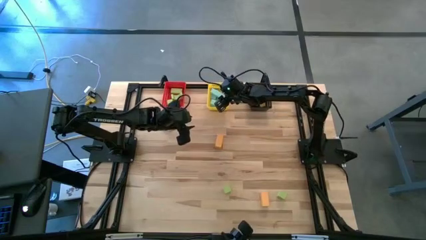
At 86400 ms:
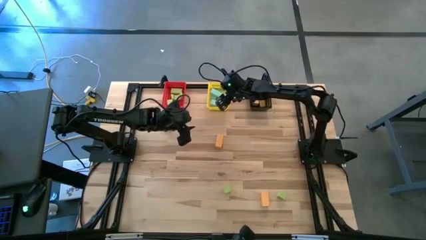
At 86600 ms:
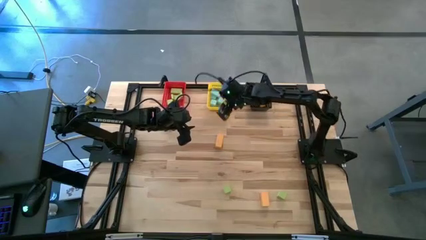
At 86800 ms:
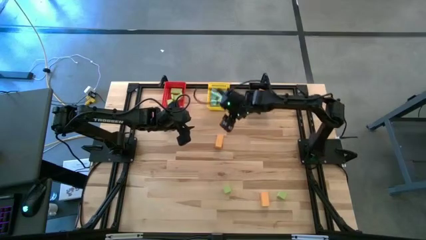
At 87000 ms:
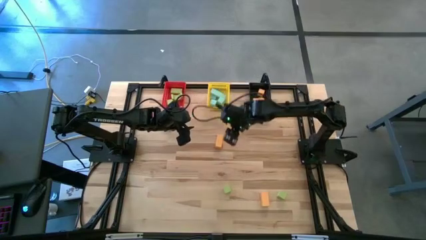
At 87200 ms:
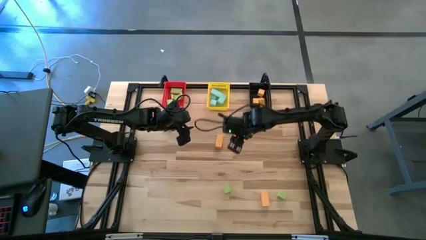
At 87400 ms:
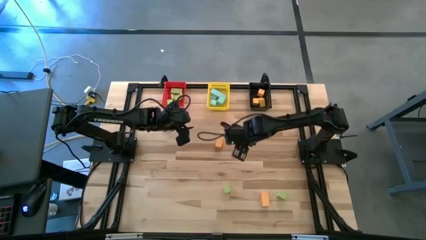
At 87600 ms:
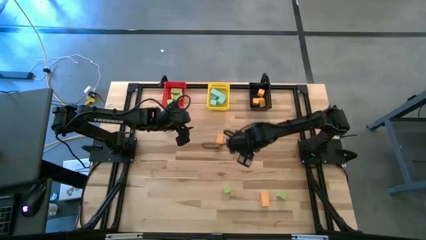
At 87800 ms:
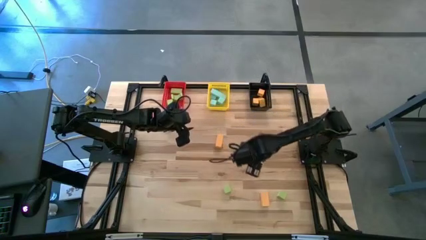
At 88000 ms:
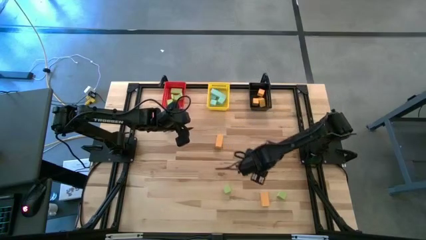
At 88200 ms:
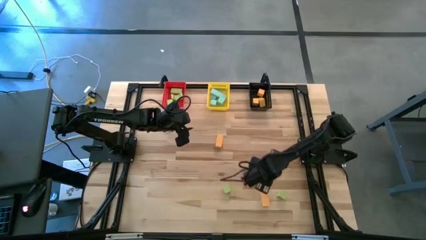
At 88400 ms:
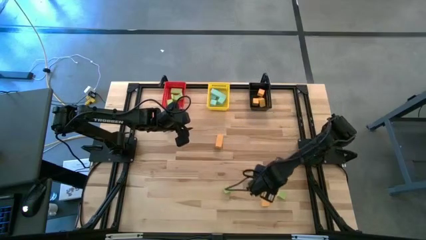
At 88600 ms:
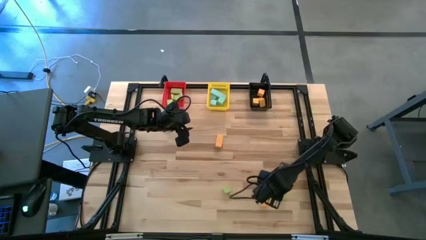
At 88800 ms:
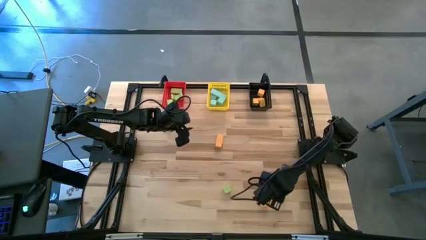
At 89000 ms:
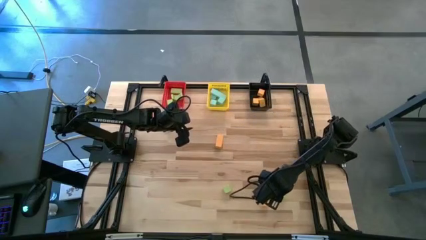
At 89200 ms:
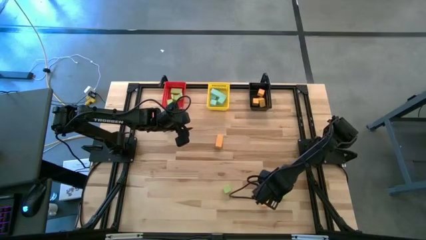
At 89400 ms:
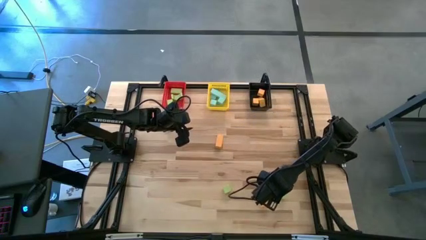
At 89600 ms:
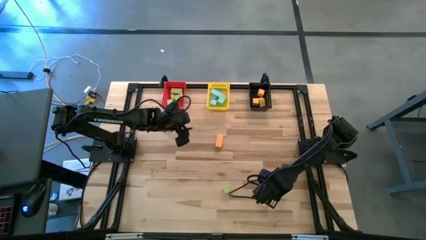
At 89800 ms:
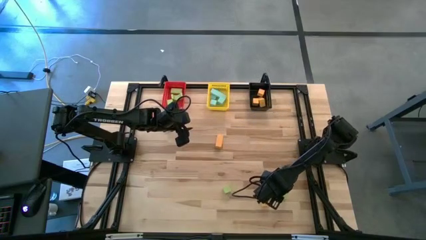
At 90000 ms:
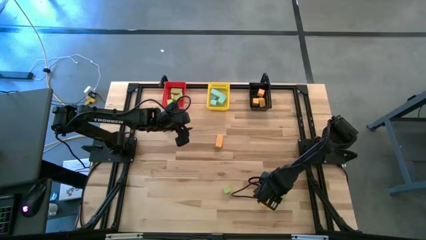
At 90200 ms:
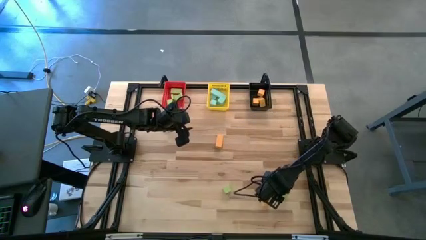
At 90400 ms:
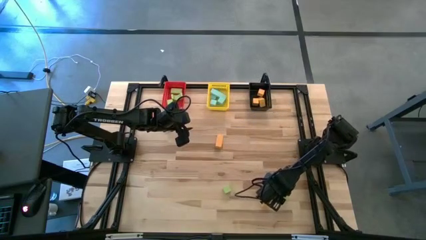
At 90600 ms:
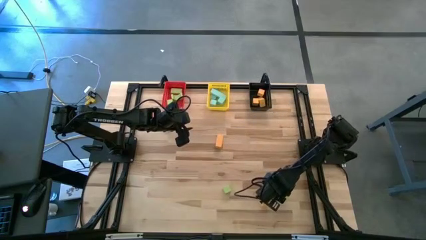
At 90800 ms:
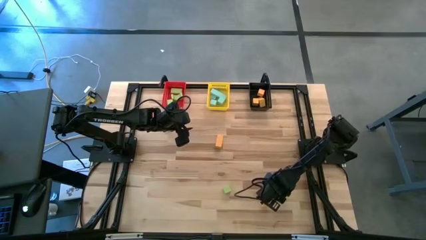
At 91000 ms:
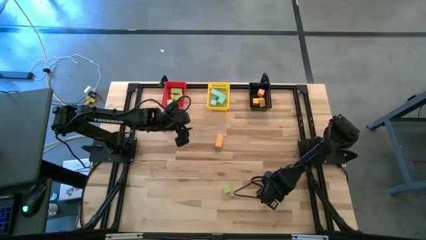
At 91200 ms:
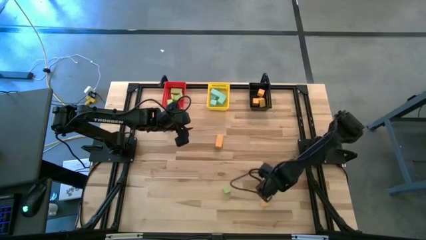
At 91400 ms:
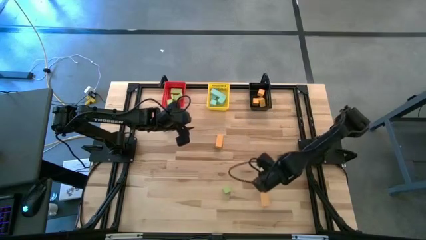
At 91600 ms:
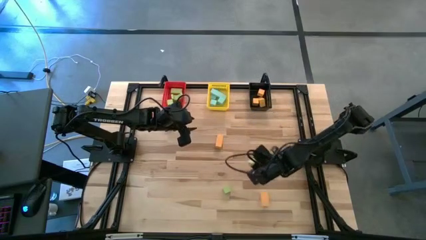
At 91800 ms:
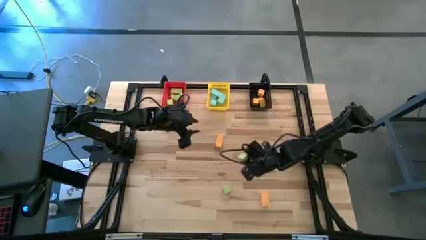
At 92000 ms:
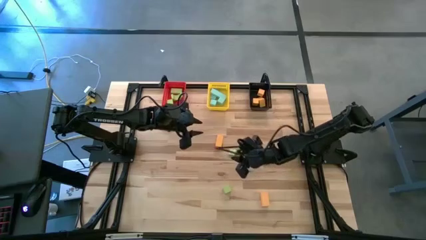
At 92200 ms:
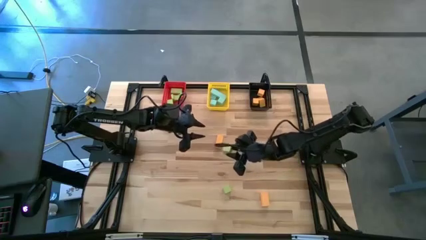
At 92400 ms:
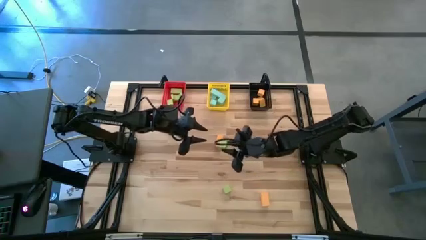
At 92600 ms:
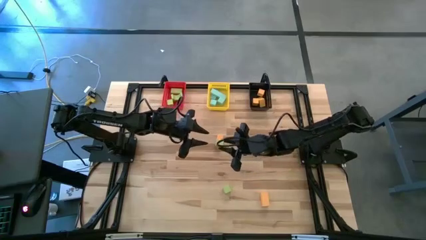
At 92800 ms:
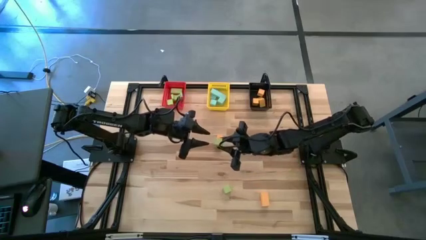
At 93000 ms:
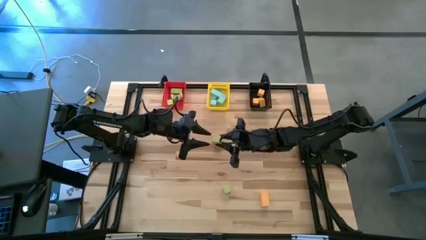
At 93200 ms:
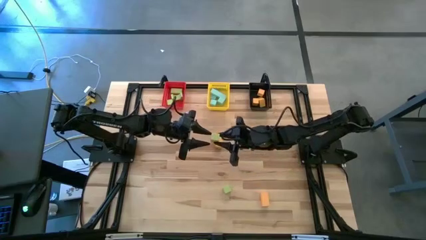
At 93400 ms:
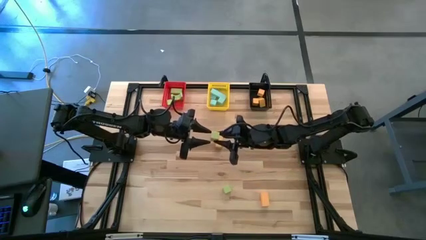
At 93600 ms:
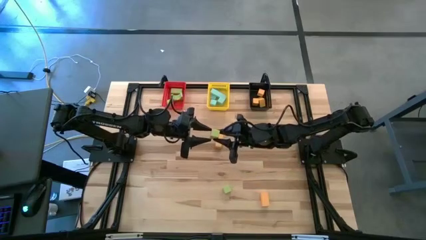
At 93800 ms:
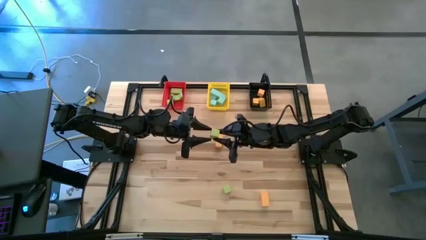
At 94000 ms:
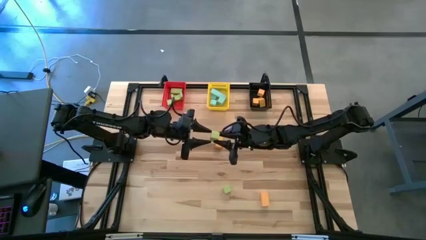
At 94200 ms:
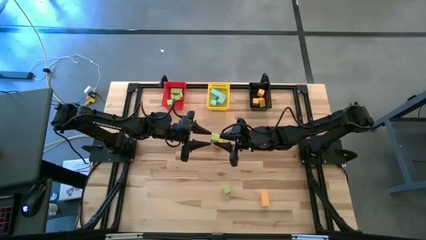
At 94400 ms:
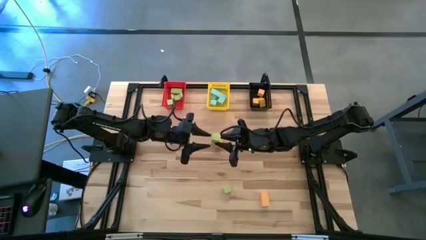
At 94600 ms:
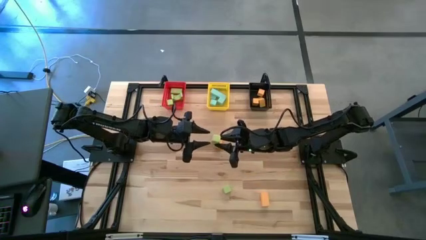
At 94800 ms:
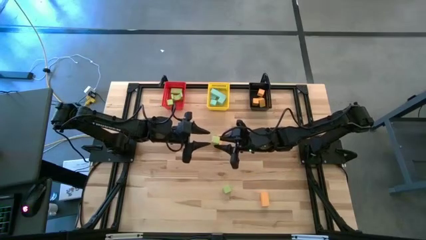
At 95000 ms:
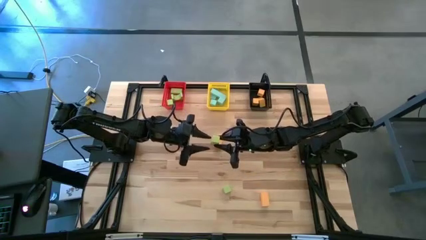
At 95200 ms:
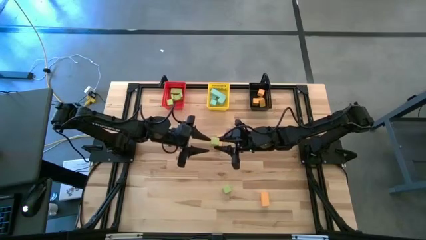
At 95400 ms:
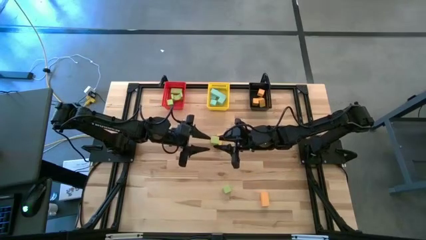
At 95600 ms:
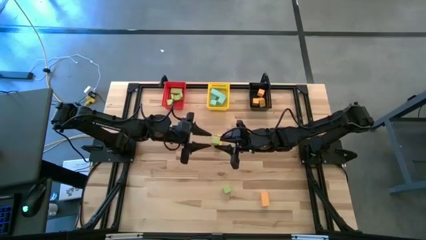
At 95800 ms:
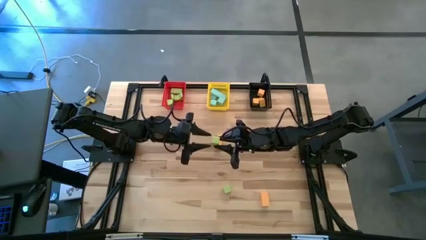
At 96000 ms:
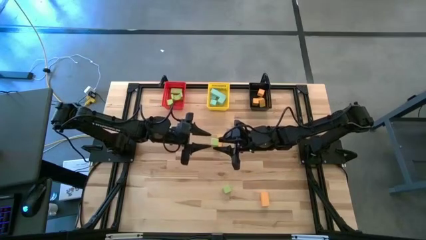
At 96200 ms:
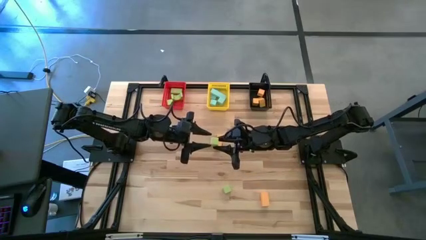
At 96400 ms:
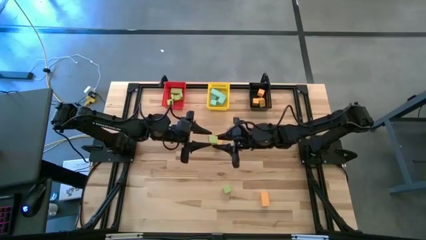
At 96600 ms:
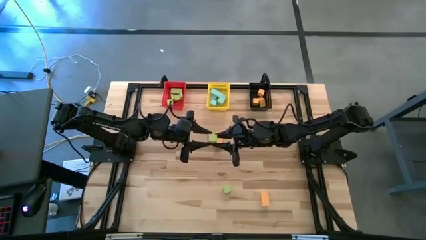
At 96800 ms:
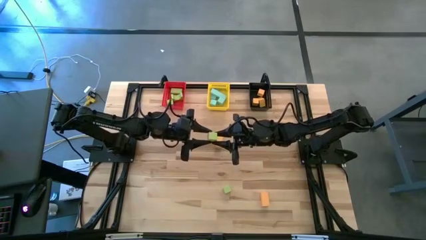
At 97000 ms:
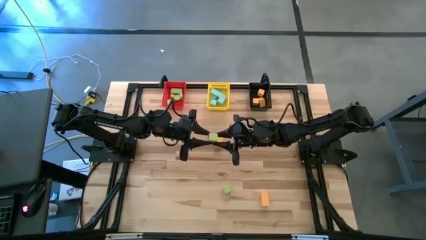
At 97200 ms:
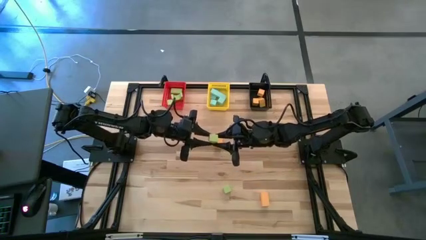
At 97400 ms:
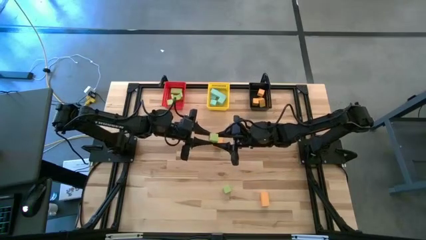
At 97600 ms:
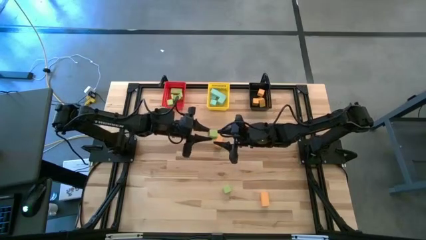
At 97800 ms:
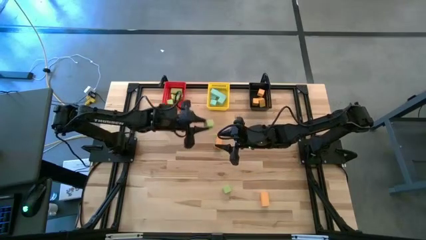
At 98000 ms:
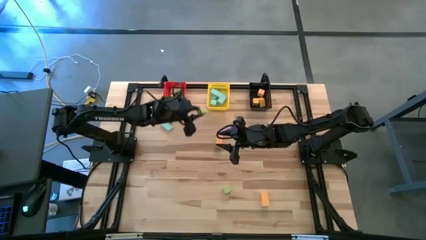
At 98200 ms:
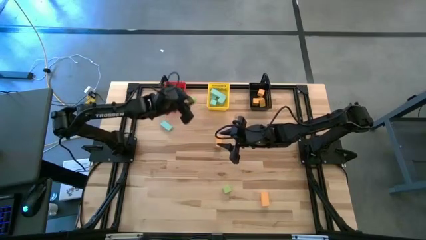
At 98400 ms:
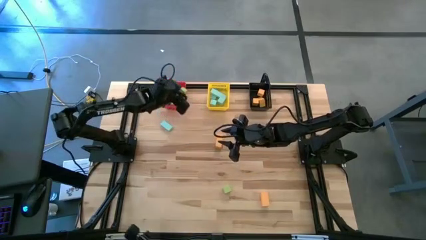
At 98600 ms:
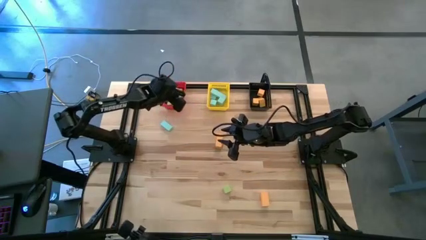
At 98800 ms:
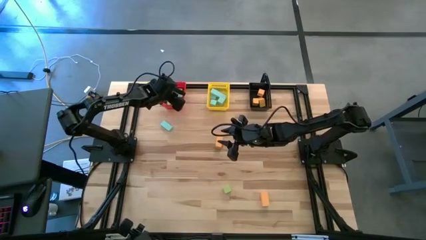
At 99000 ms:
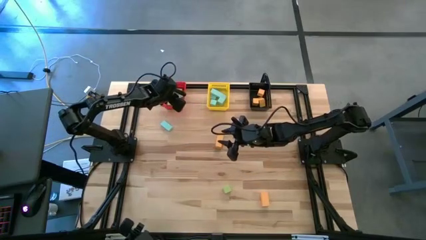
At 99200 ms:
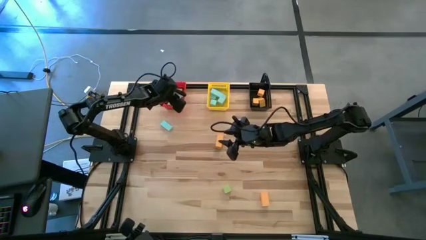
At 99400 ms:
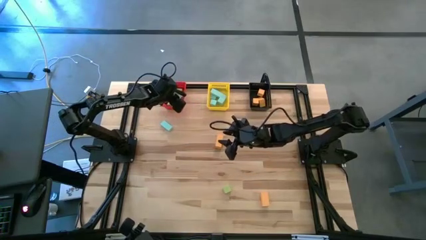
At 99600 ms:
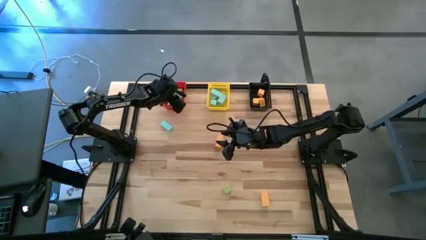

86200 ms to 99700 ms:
Task: Sort & place blocks by color
Put the green block into the red bin

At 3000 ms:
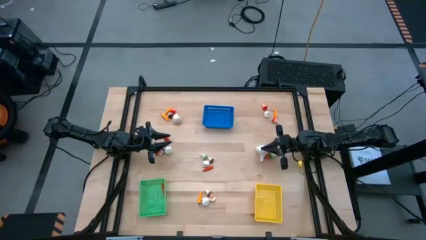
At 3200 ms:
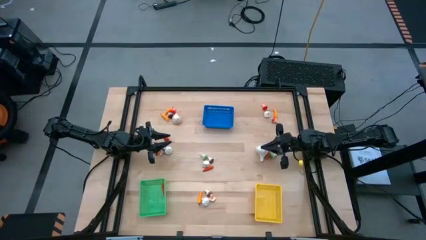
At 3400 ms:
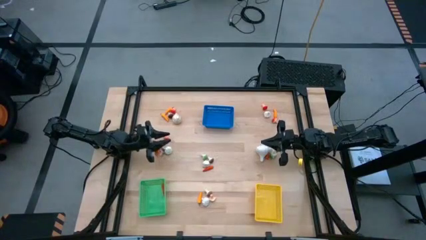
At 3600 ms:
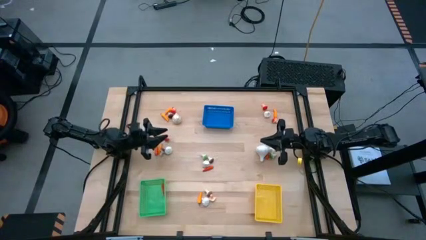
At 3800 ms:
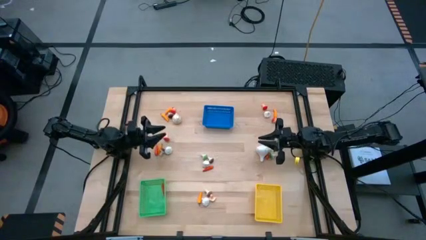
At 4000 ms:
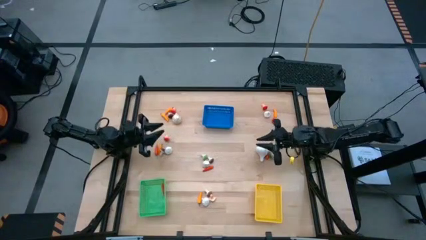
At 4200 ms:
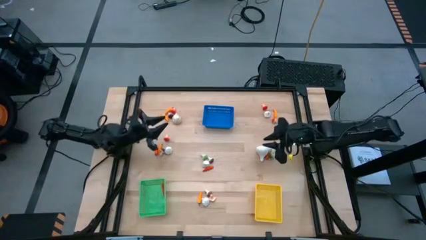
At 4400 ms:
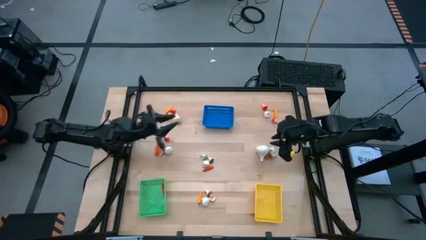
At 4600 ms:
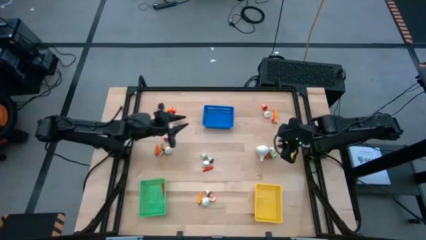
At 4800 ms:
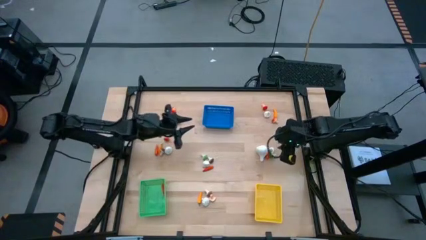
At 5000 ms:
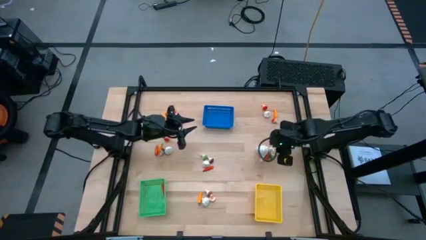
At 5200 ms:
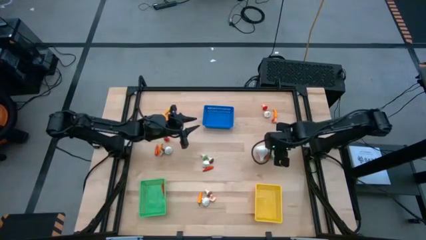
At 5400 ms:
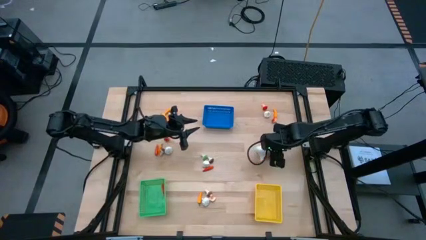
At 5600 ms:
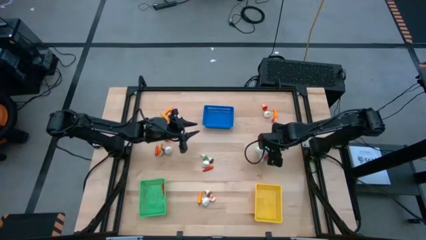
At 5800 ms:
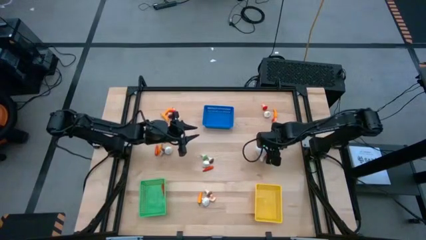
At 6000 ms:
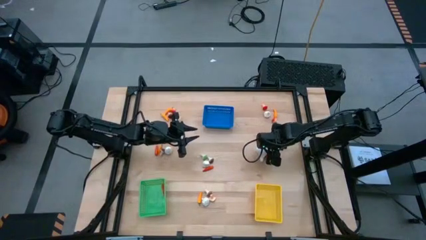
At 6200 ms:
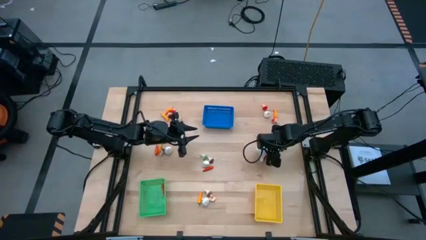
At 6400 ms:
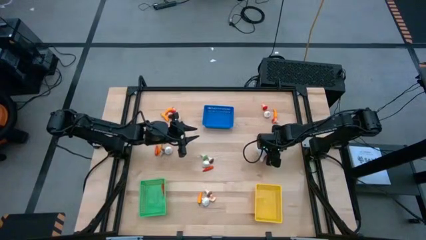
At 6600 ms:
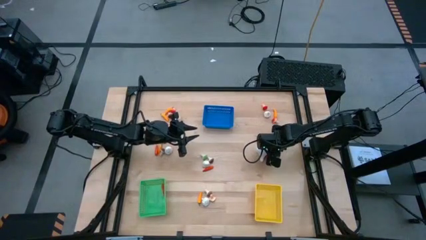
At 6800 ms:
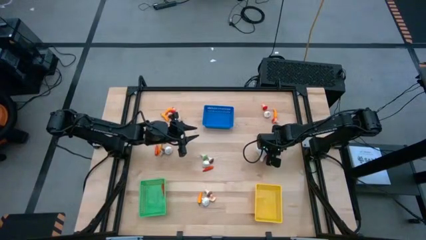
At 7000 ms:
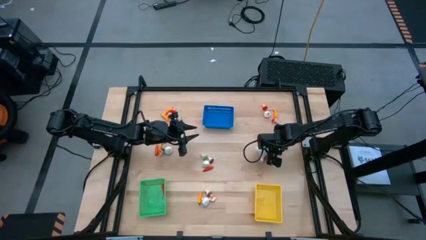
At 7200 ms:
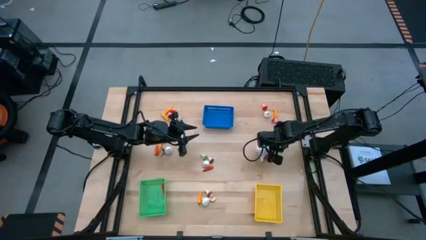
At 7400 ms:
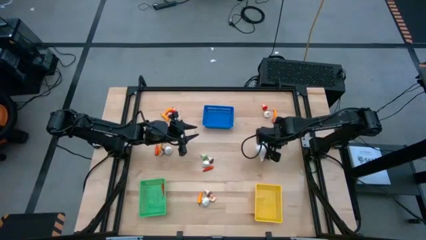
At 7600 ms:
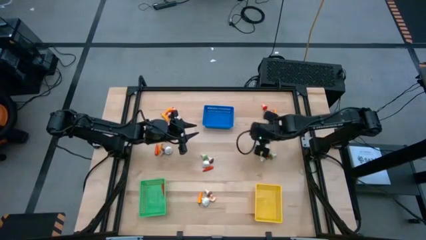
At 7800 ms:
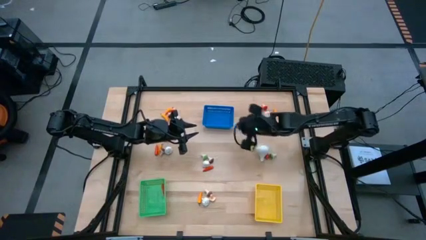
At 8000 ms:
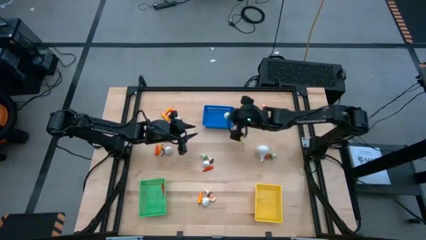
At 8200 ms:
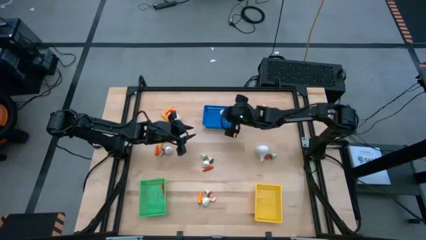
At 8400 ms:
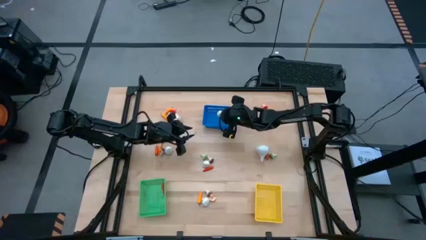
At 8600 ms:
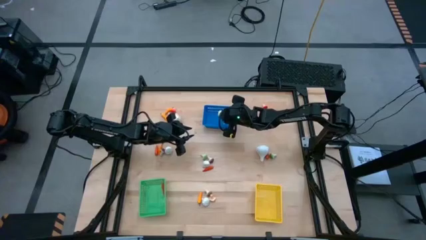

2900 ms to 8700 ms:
Task: Sort produce into baskets
Put the green mushroom into the blue bin
